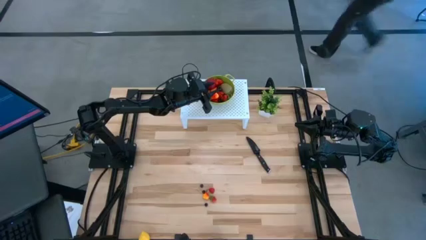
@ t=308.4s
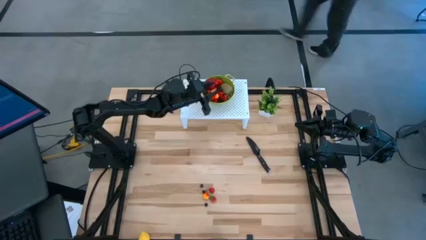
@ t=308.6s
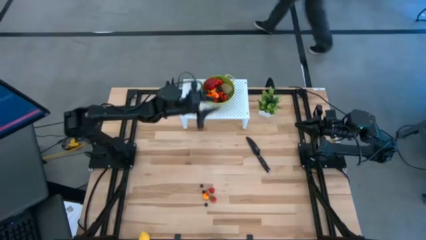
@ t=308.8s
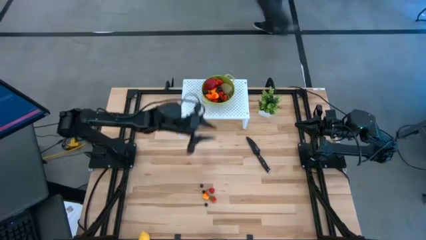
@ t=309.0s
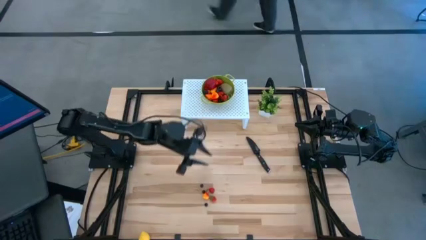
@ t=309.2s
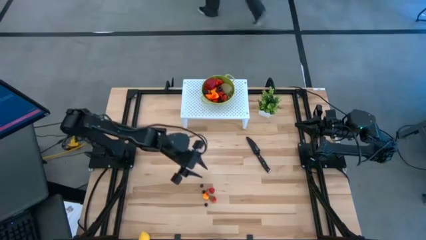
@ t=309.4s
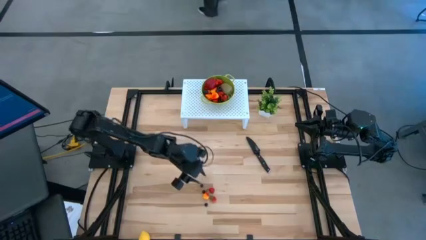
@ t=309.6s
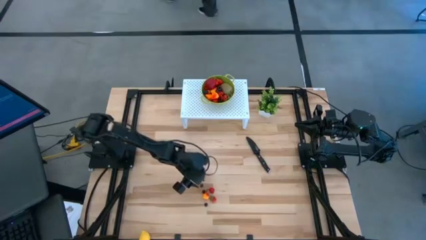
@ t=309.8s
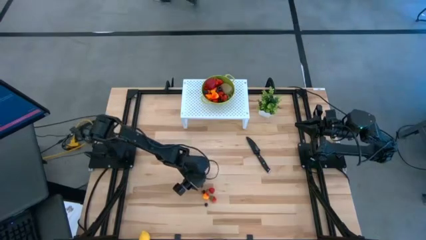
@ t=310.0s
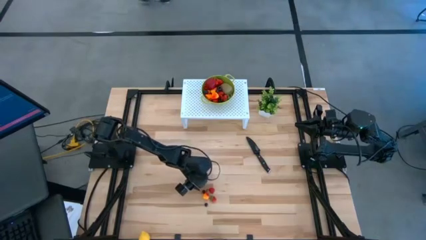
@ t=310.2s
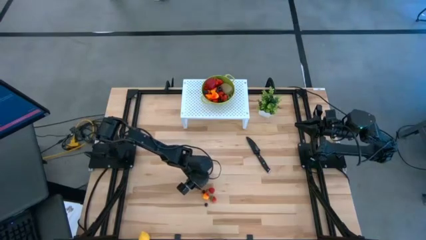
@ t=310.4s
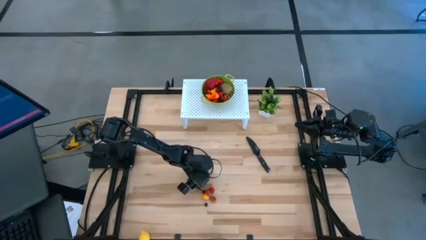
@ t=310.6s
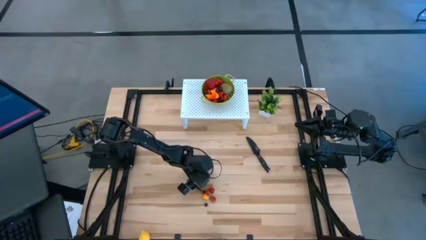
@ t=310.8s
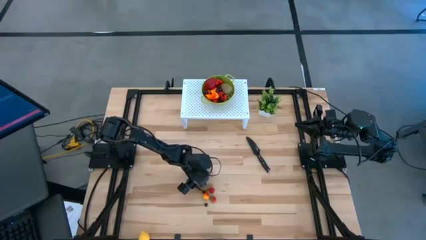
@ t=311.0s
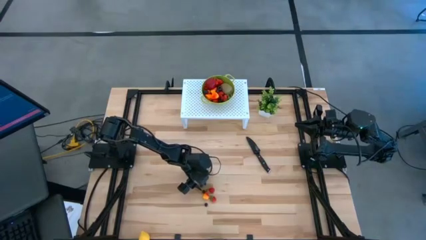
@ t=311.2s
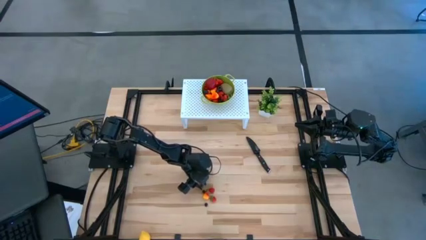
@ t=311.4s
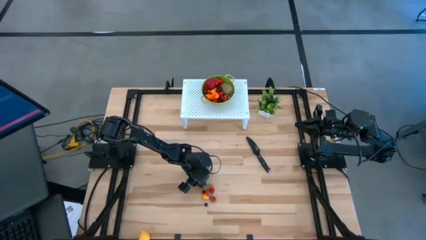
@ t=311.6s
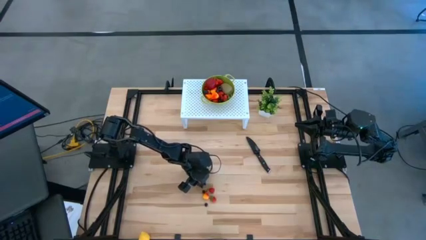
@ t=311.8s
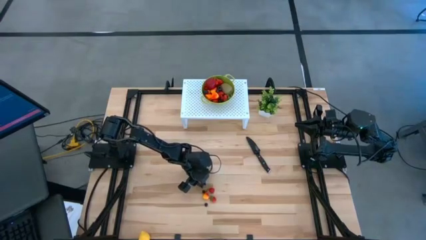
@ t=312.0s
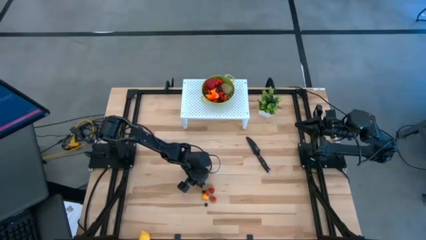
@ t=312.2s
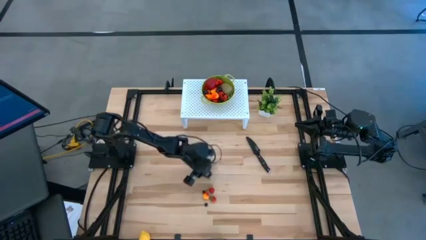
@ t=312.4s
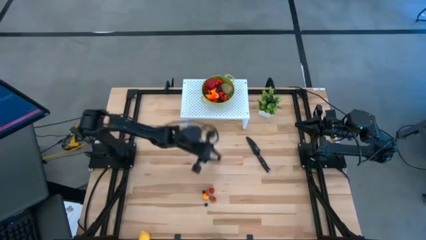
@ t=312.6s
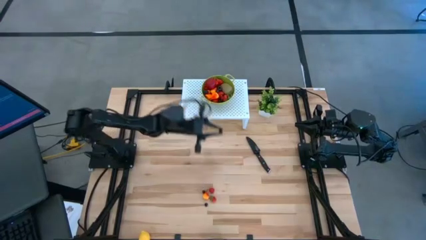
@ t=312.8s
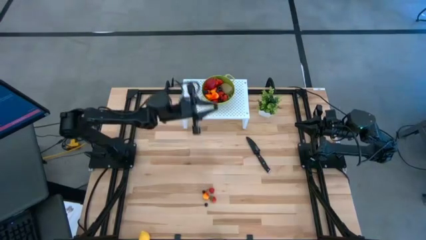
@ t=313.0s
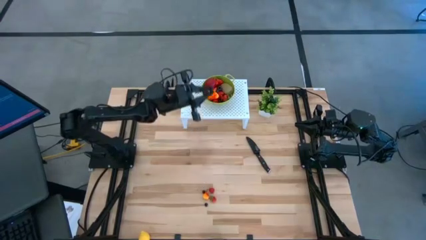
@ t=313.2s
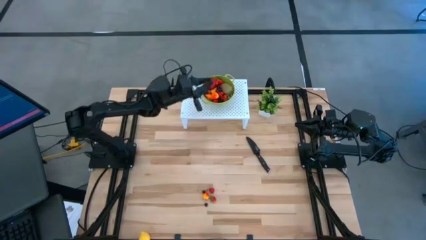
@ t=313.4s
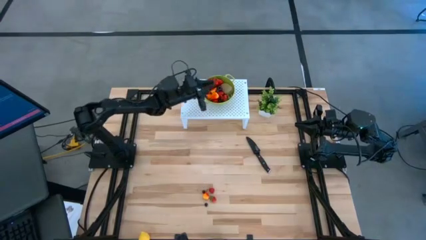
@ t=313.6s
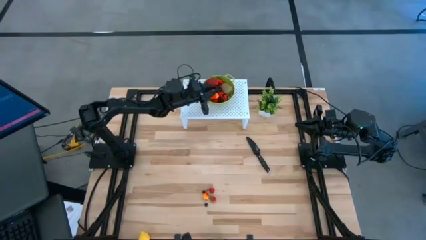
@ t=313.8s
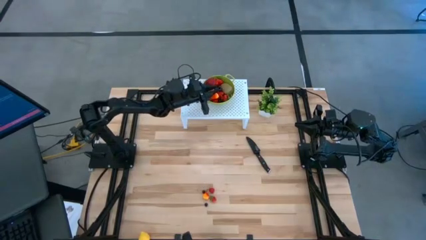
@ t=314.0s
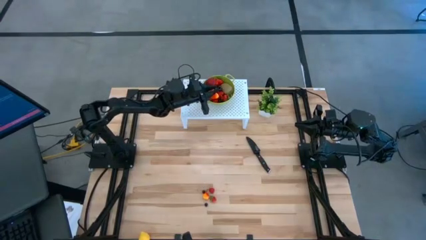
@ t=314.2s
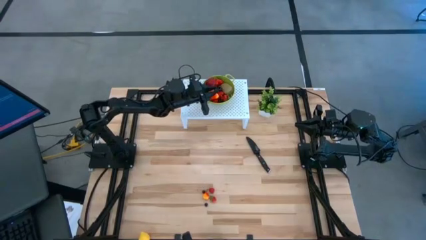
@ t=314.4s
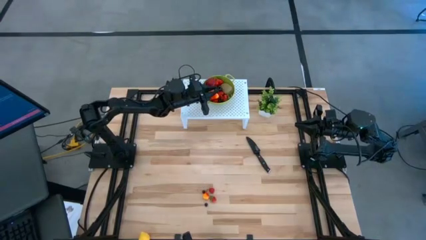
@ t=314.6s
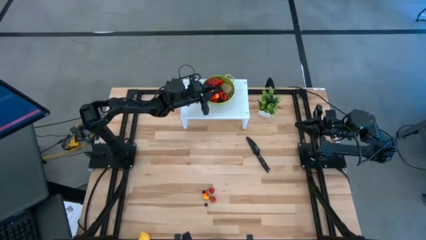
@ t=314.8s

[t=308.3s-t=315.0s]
Task: Pick & Place Fruit
Put the black blueberry into the green strainer bowl

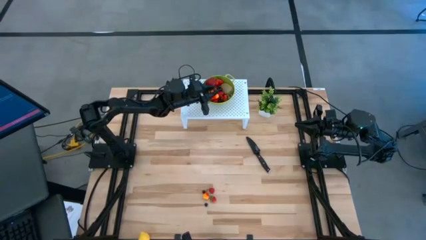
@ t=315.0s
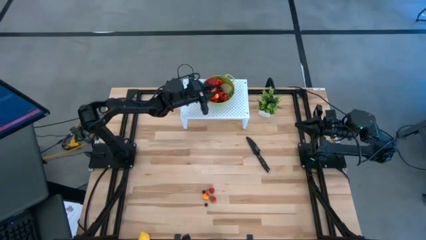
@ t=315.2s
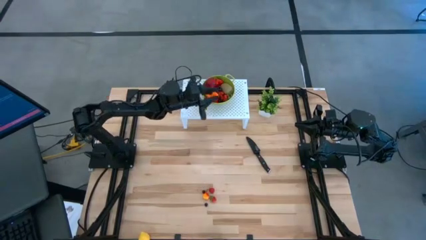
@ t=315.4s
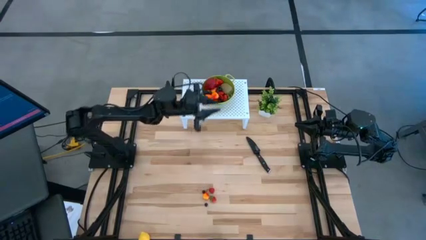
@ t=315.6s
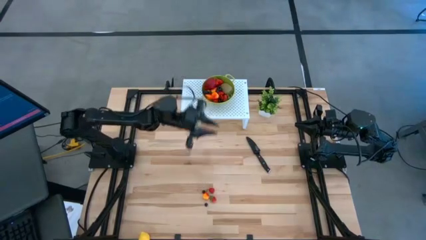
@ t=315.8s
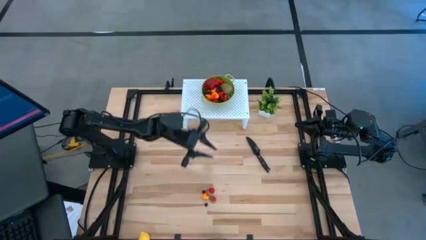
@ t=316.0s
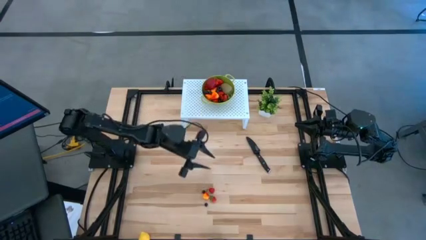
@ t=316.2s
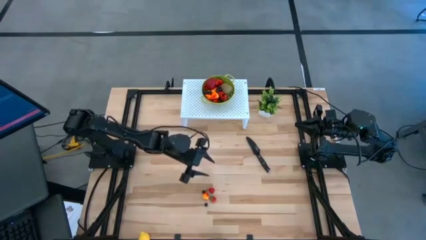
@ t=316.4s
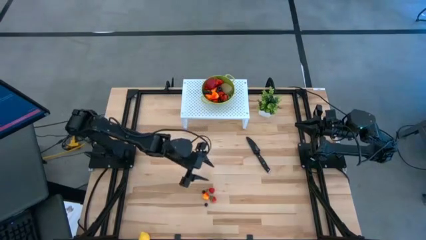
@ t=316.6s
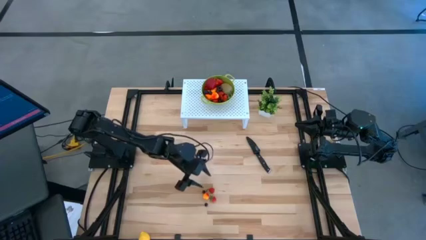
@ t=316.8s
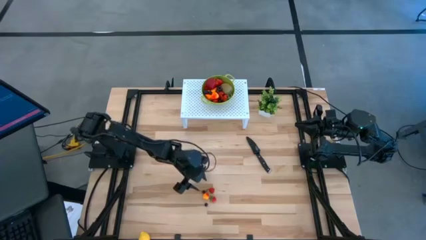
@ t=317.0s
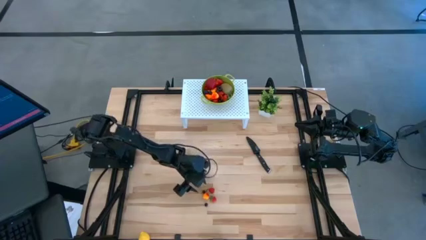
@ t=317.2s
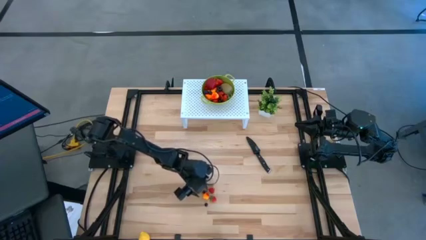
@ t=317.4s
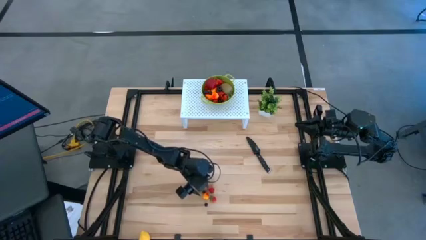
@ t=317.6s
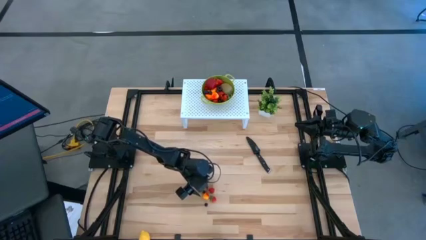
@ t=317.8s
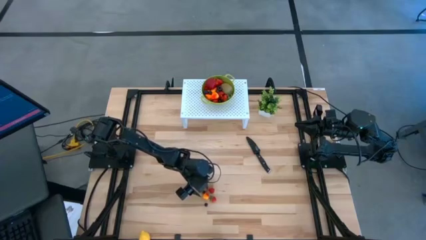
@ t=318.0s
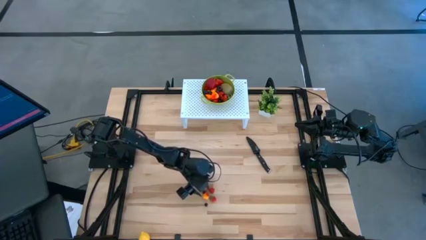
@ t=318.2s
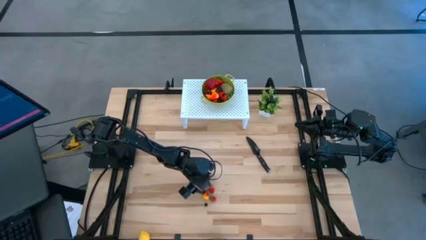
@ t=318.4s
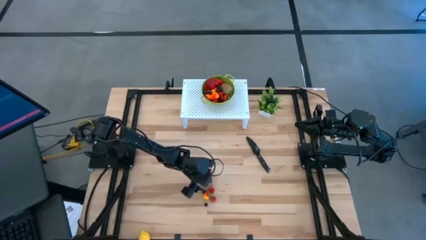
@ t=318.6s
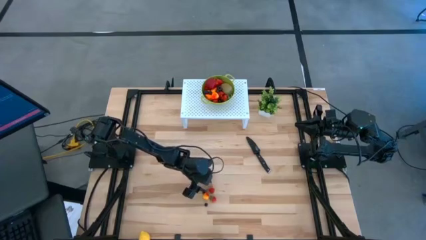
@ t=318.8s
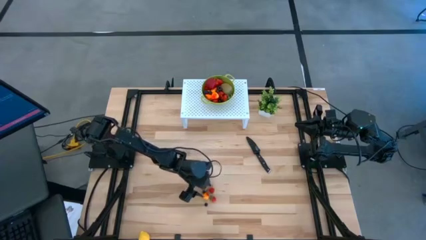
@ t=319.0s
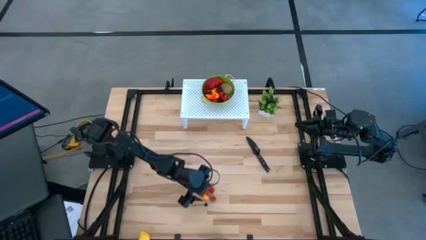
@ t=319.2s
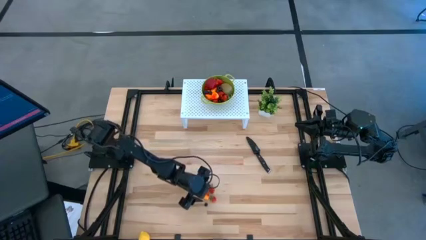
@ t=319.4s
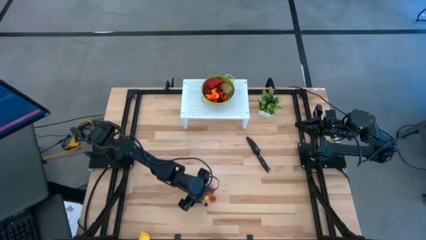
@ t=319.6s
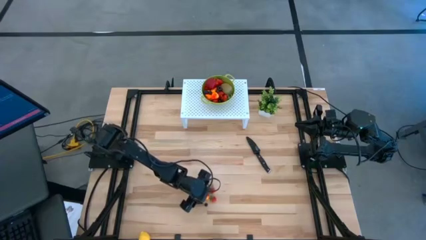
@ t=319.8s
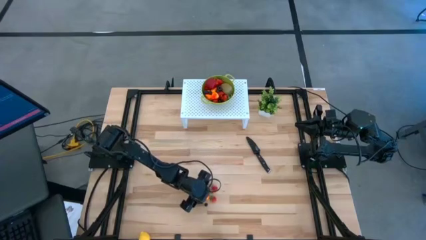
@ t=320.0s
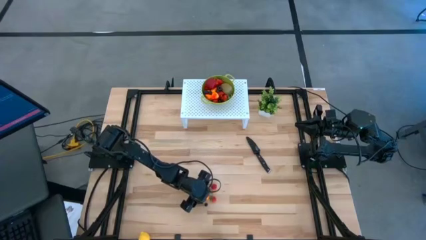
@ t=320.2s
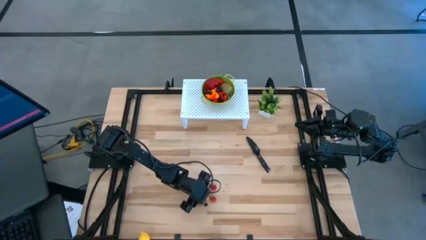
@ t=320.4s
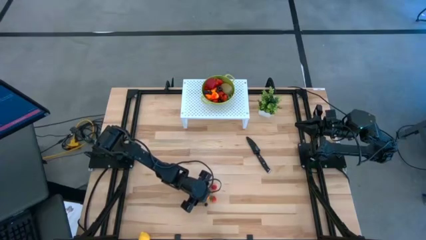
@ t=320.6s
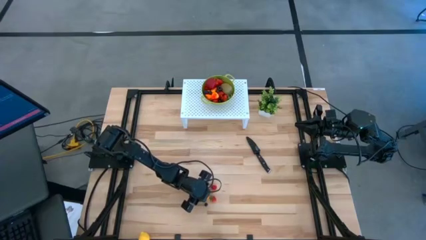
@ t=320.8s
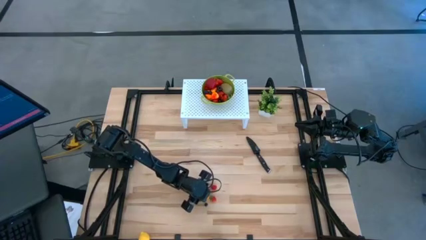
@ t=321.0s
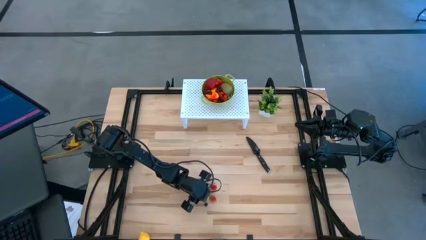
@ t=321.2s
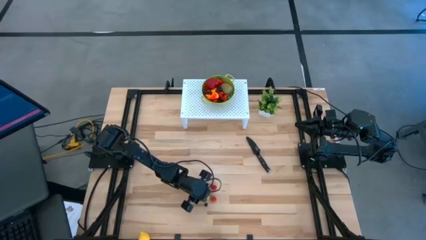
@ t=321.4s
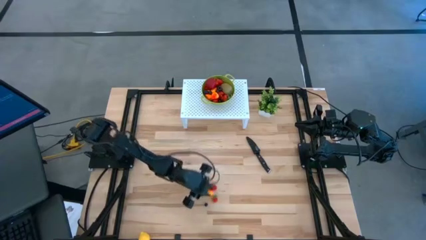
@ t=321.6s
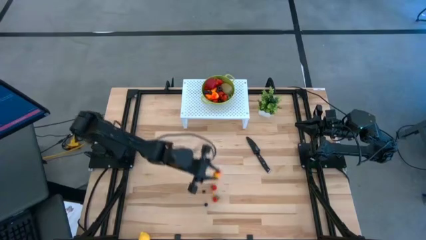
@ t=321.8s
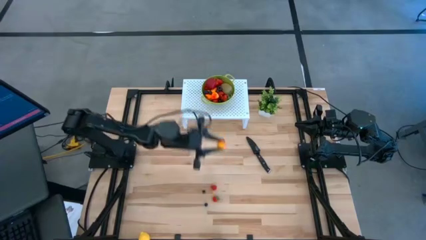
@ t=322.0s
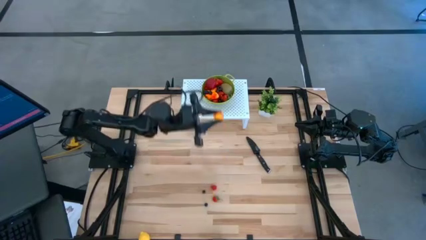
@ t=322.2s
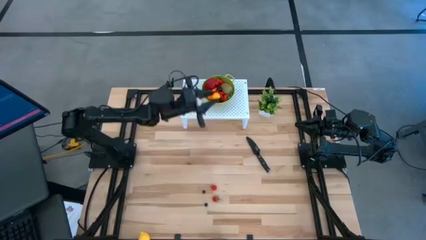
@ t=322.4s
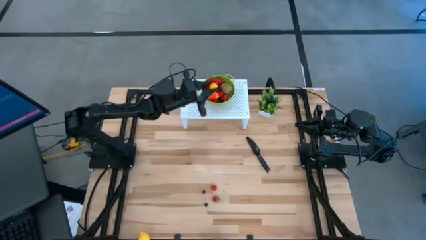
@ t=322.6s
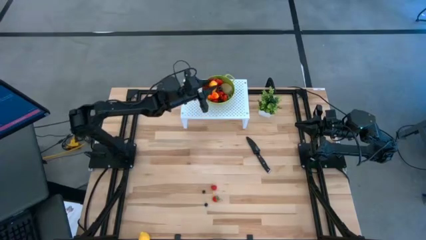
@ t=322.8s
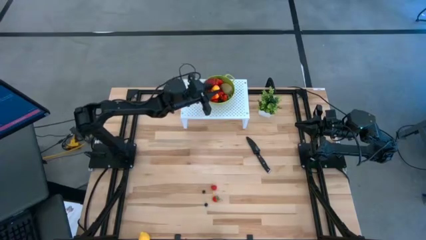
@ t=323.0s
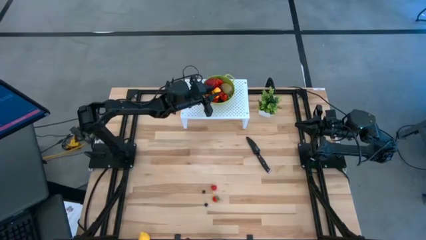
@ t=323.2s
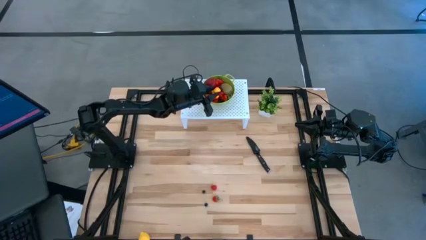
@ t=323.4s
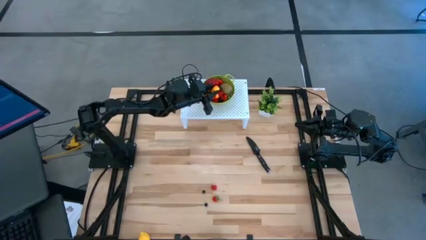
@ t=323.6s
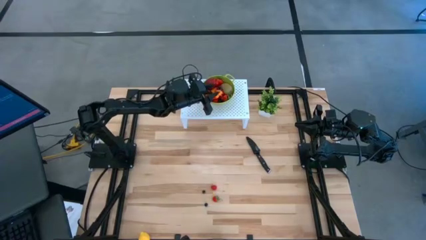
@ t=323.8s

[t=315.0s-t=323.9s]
Put the yellow peach into the green strainer bowl
